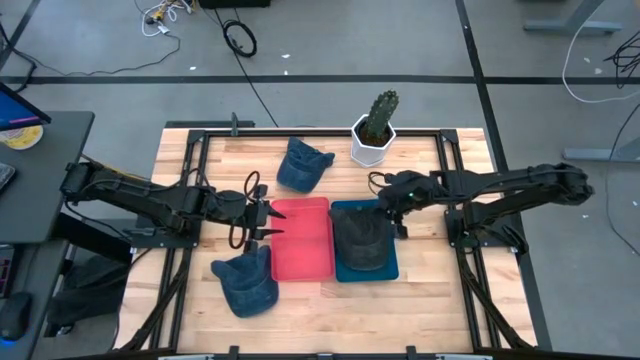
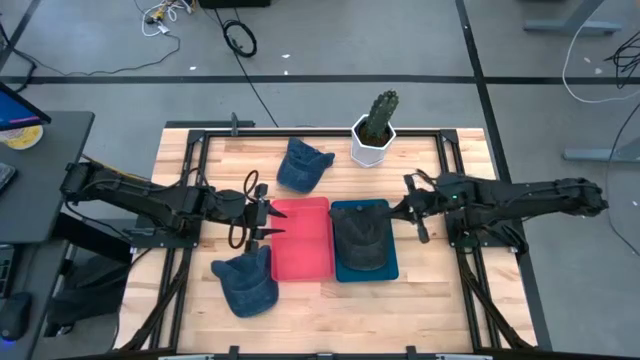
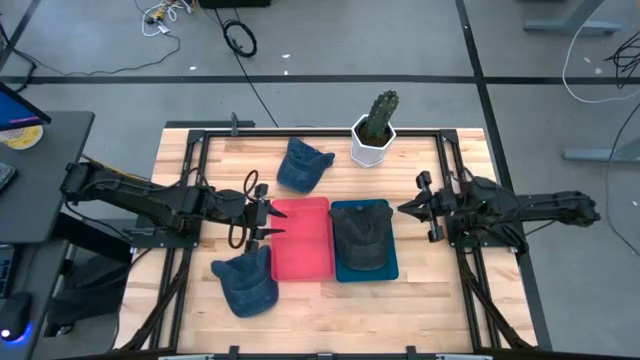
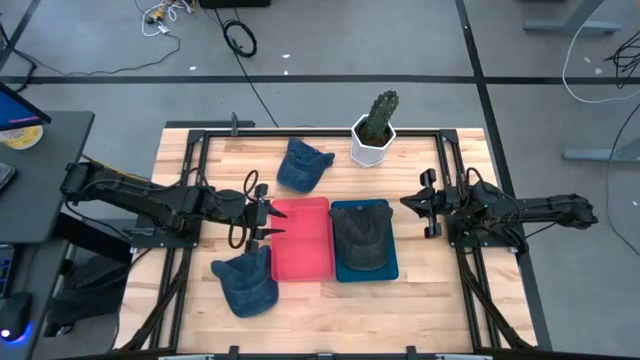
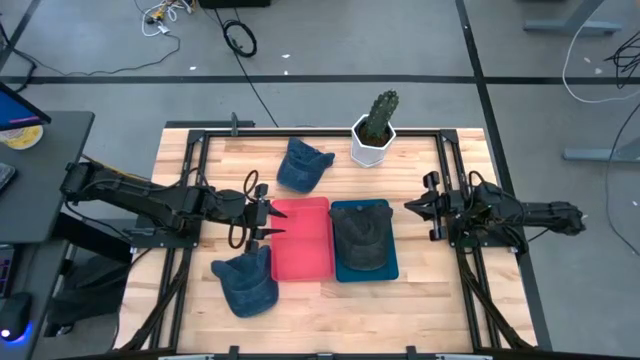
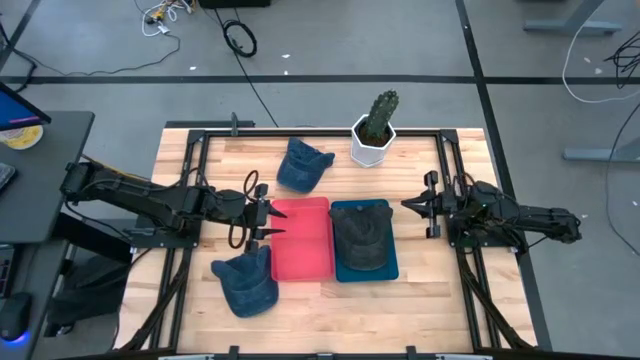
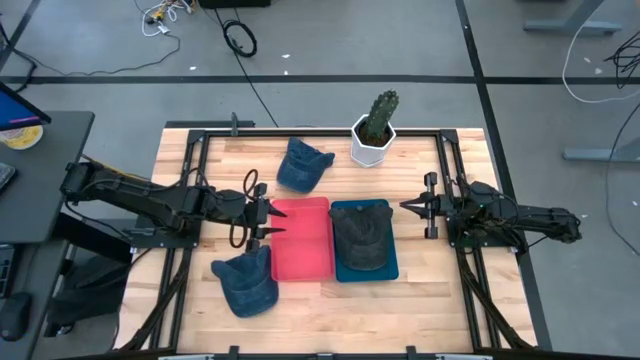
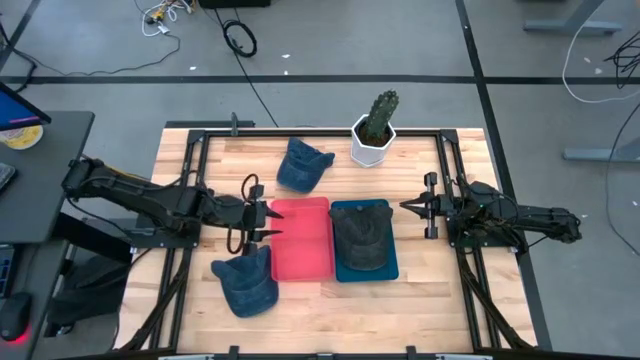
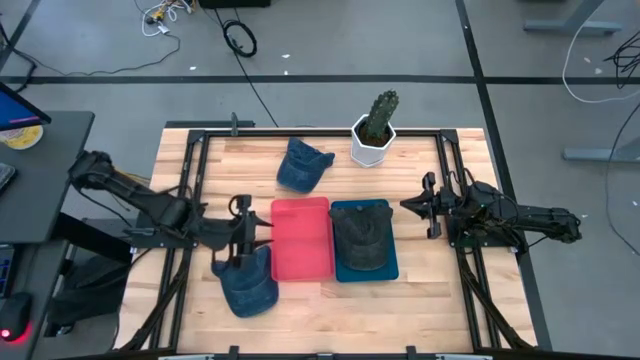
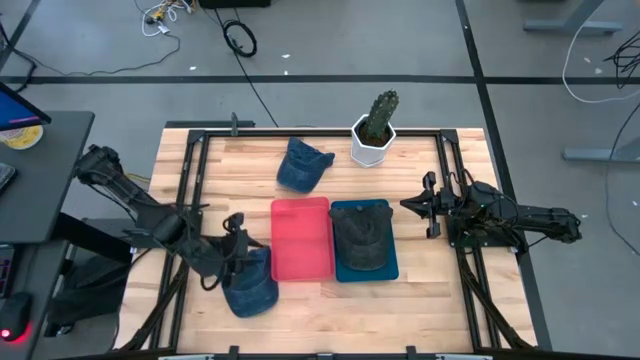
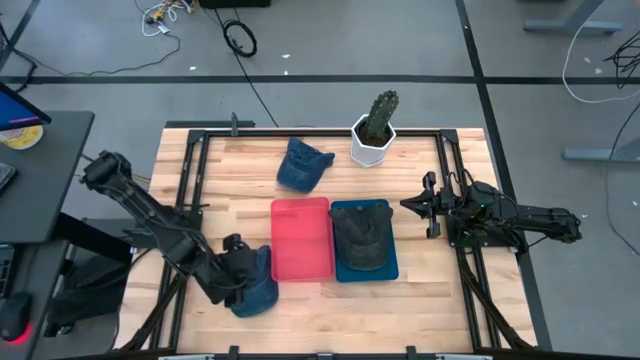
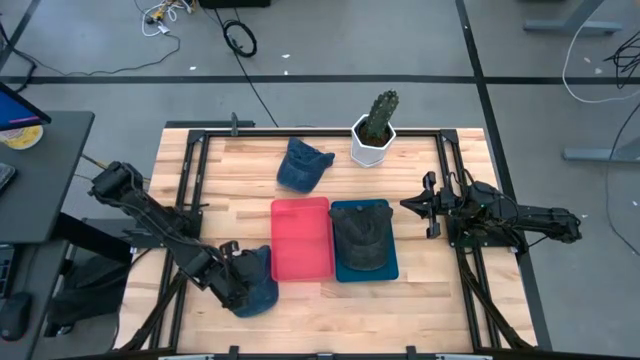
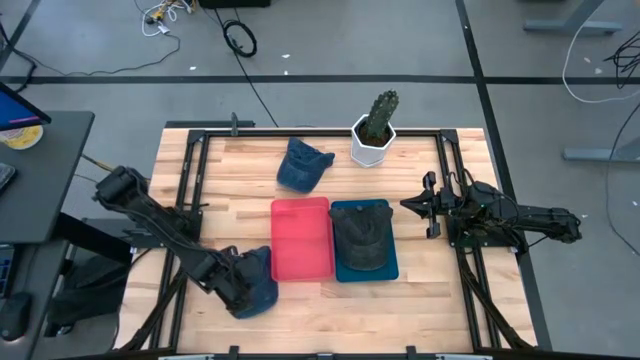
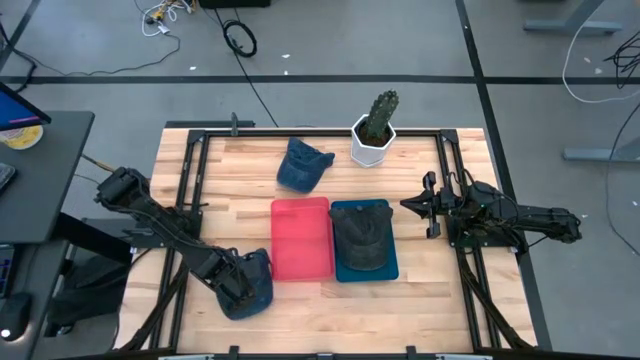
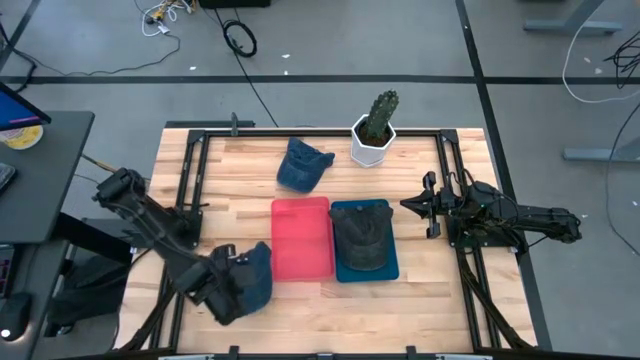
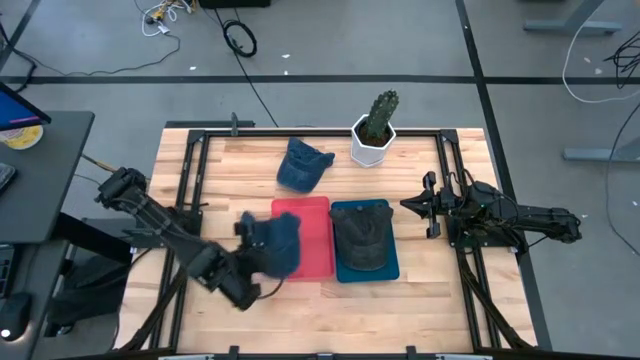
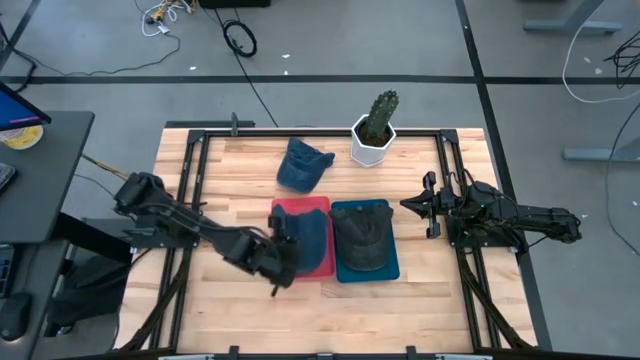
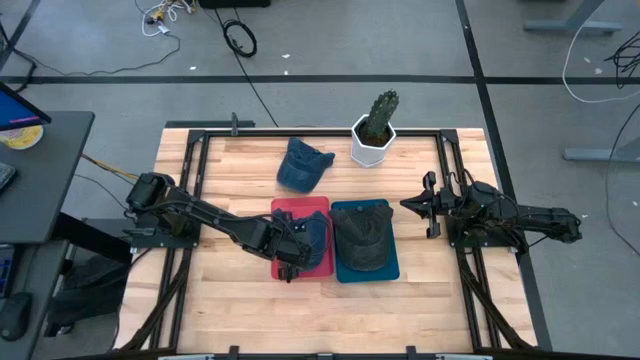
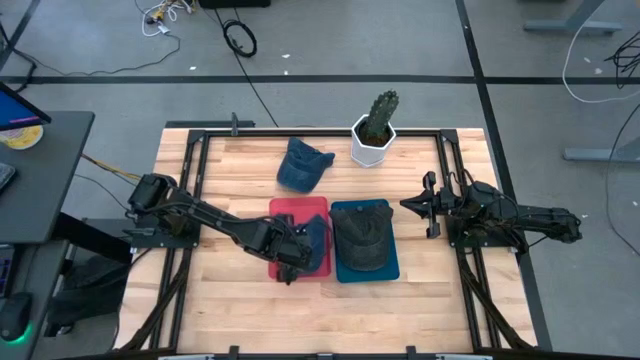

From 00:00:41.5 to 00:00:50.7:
Task: Pick & Place hat
Put the bottom blue cap into the pink bin

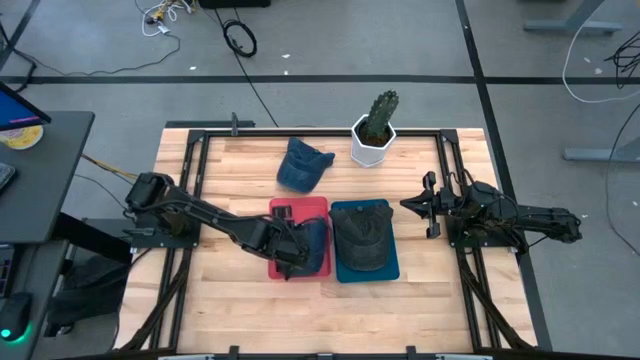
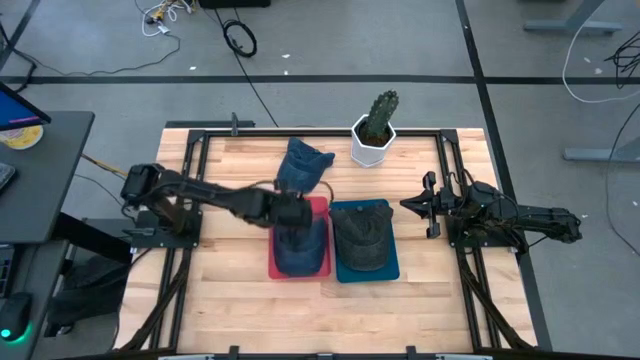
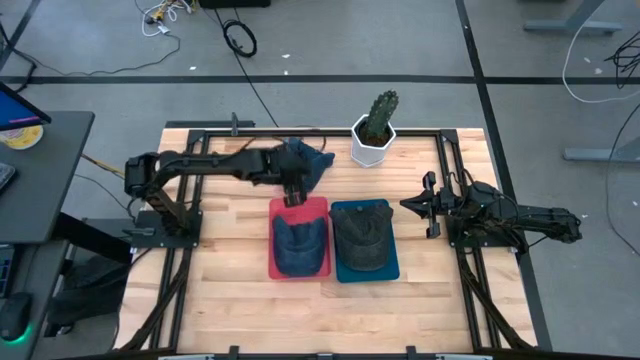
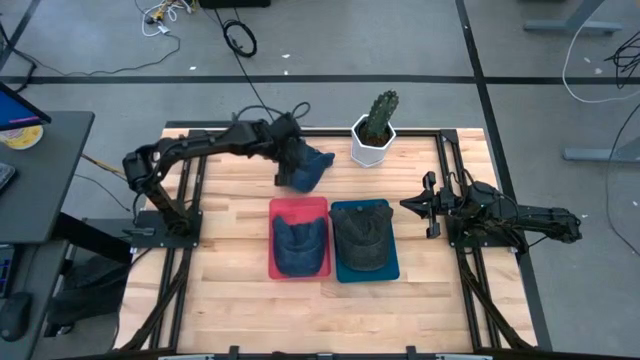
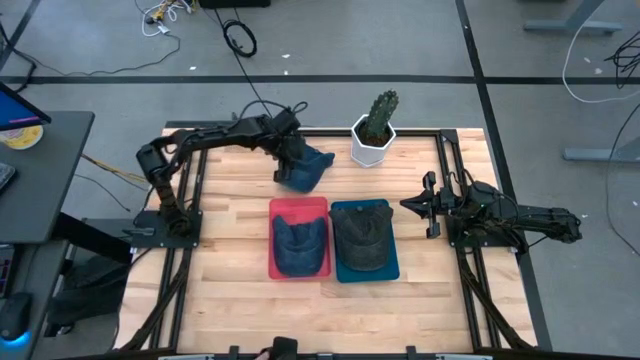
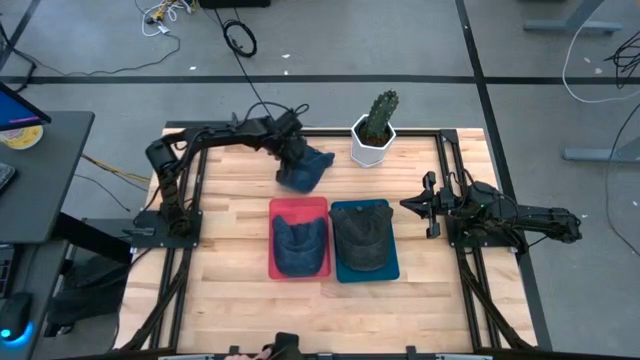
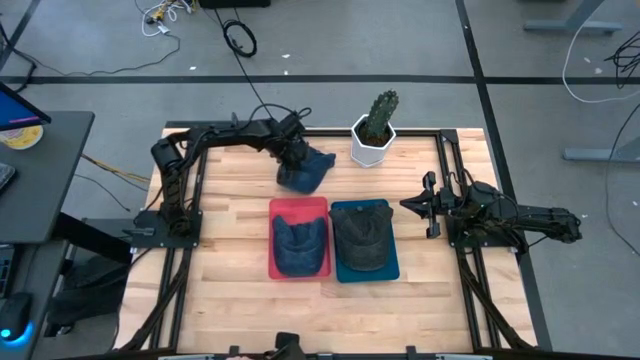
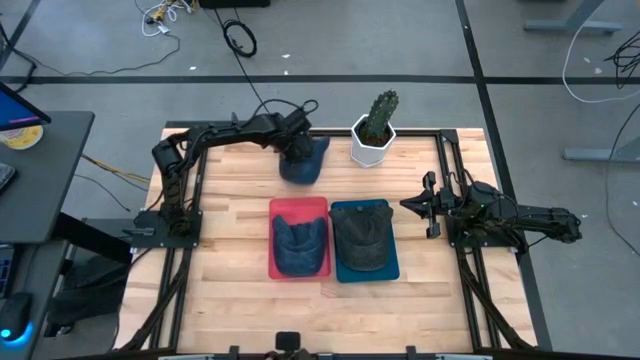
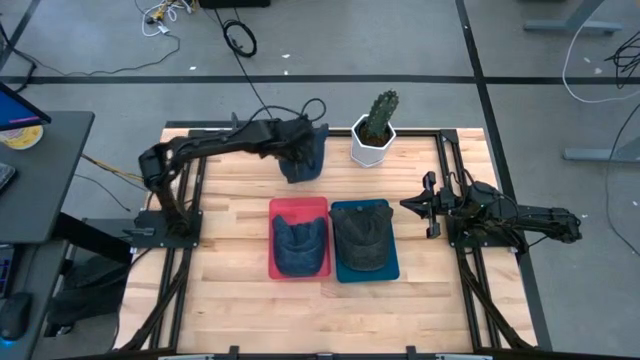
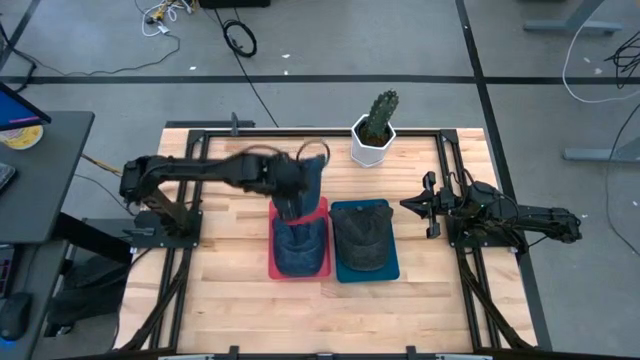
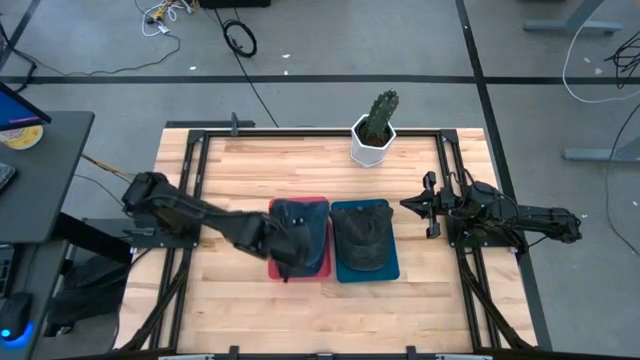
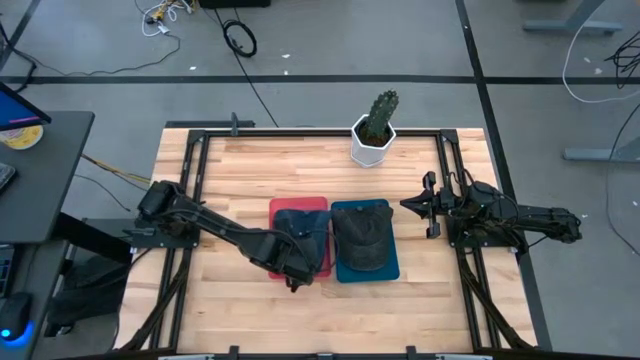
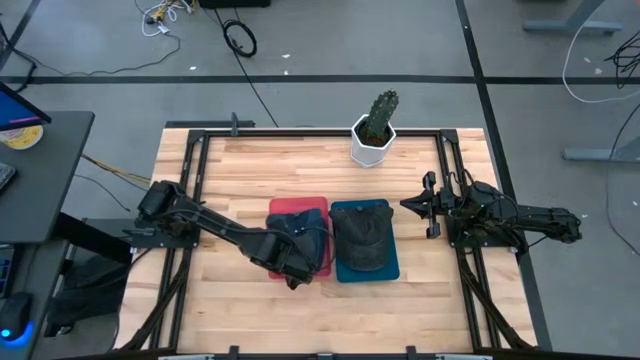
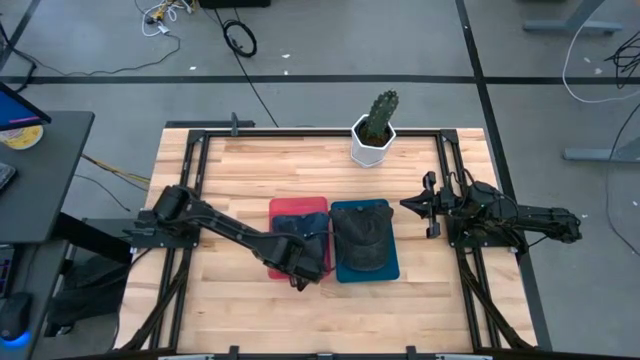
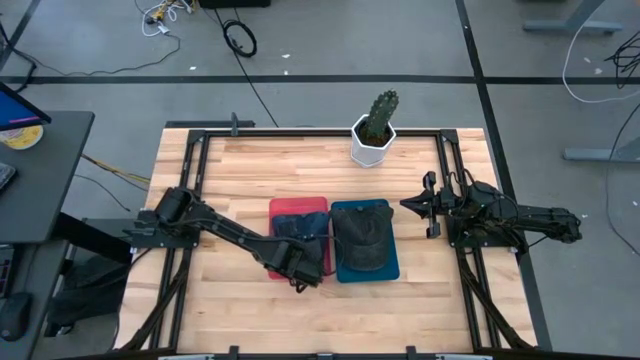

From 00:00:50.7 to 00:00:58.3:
Put the blue cap into the pink bin

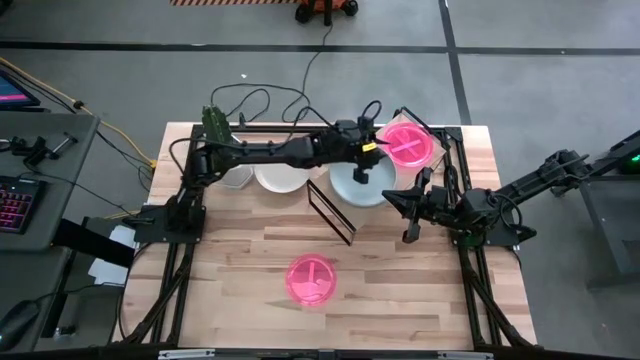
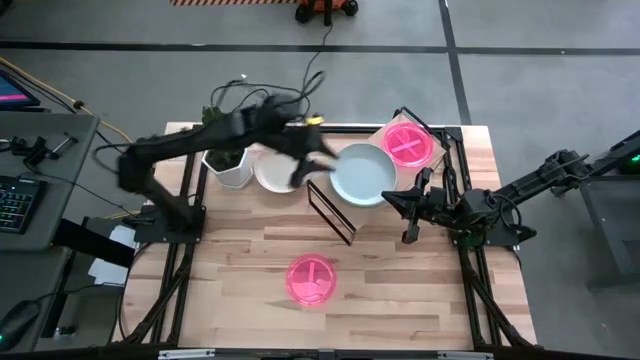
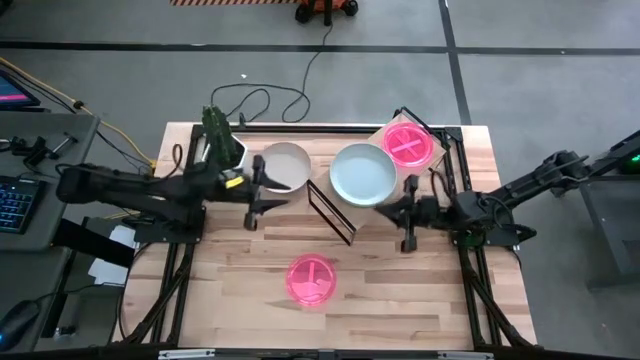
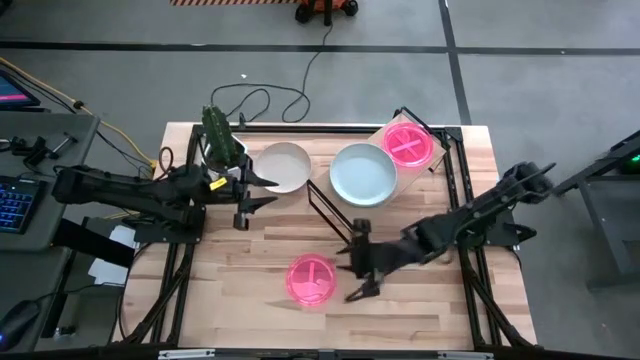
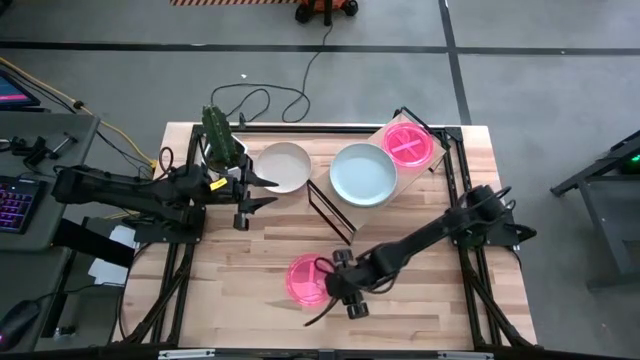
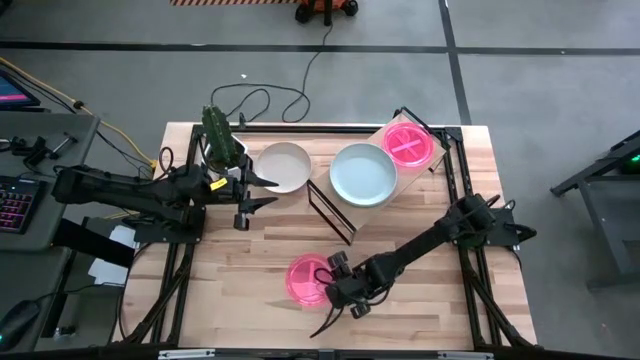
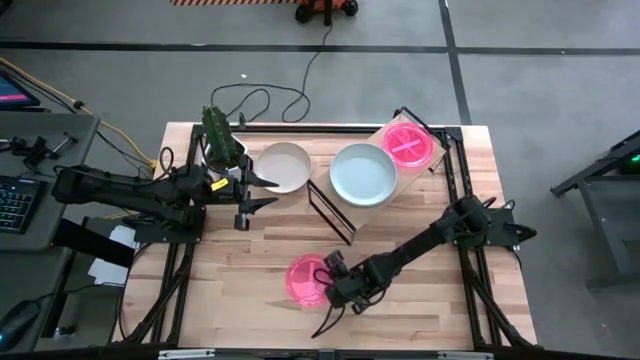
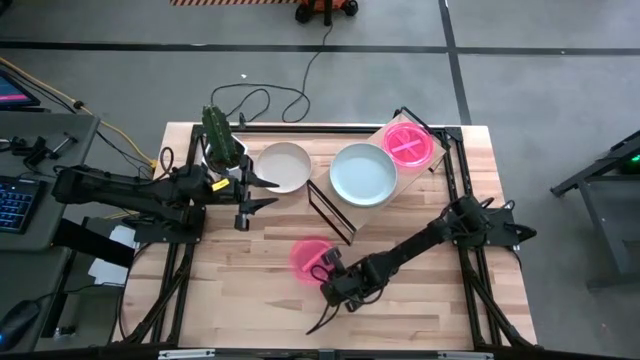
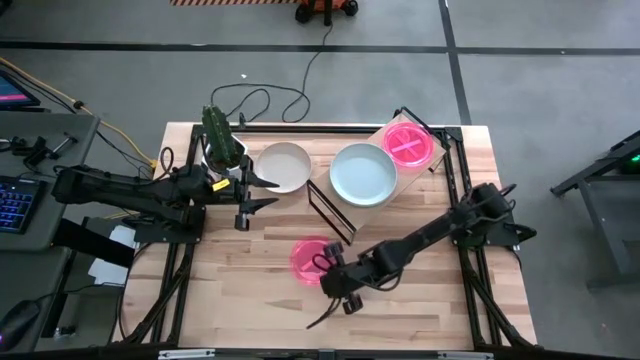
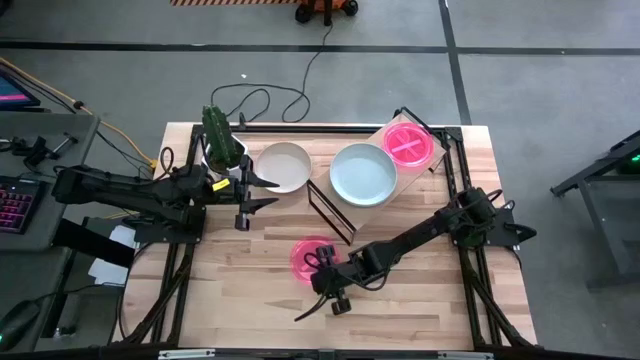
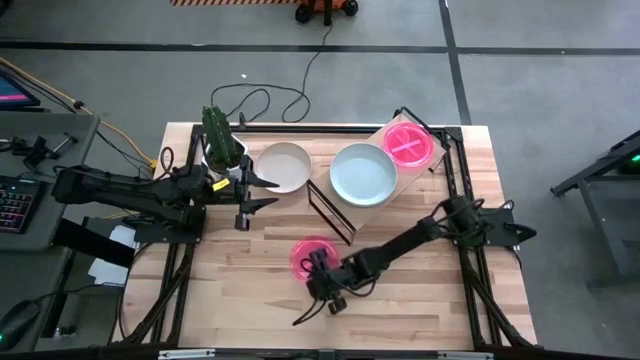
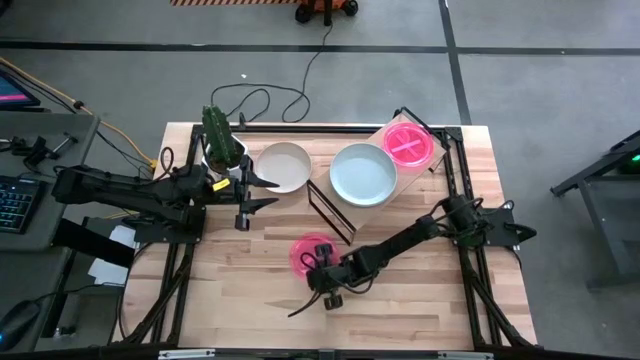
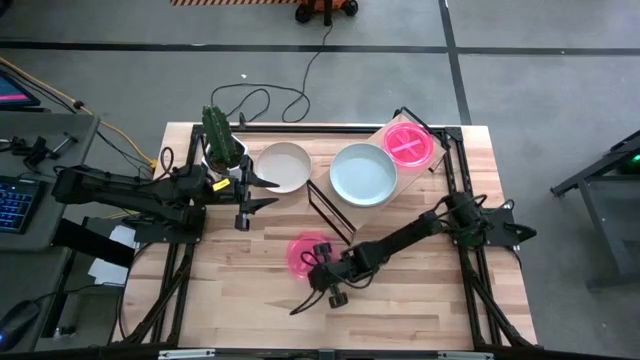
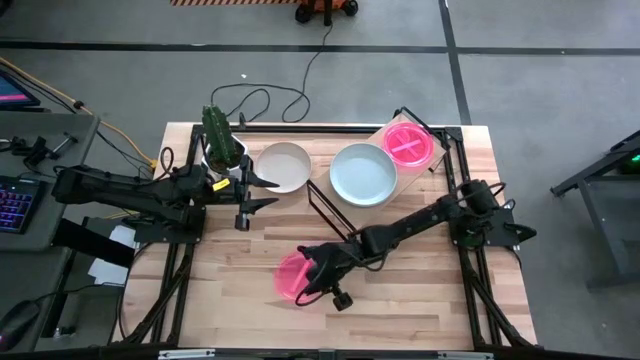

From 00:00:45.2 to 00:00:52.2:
Task: Place and stack plates onto a shelf
Stack the pink plate on top of the pink plate on the shelf
